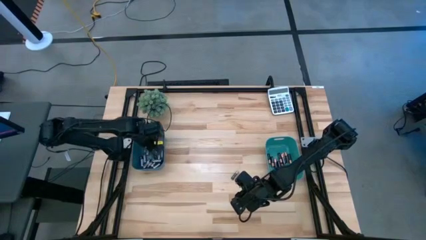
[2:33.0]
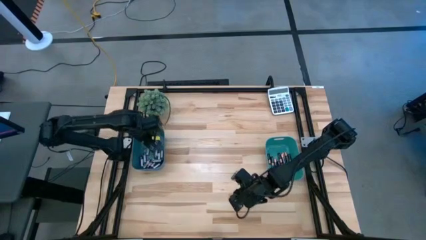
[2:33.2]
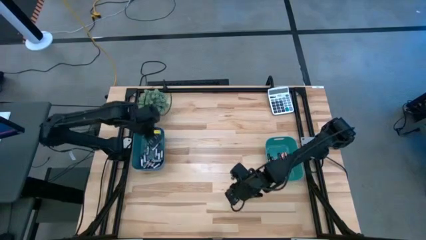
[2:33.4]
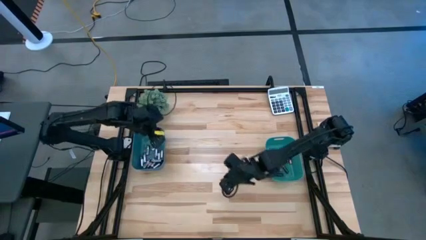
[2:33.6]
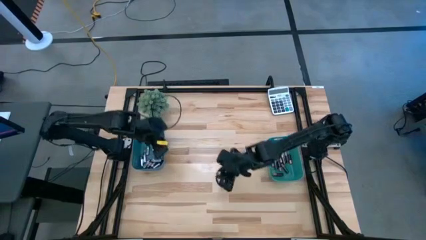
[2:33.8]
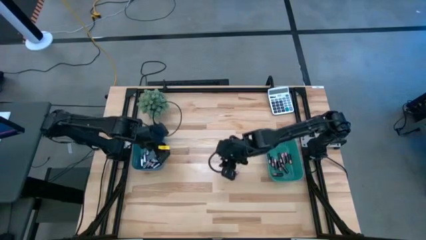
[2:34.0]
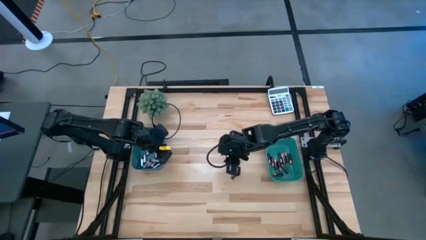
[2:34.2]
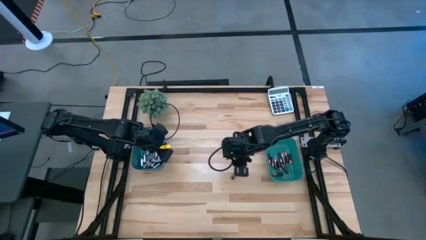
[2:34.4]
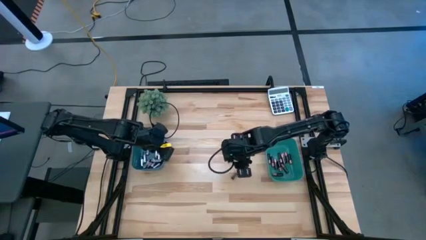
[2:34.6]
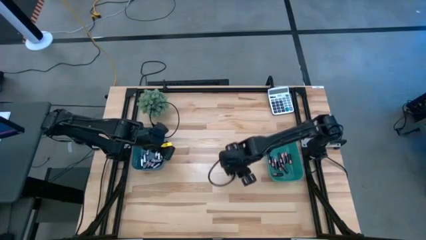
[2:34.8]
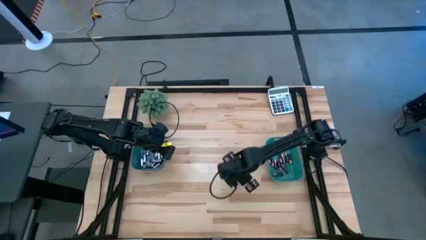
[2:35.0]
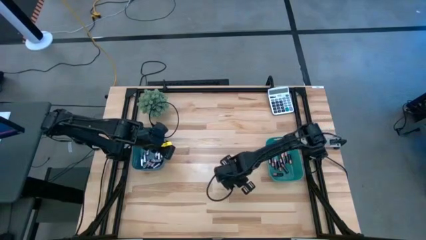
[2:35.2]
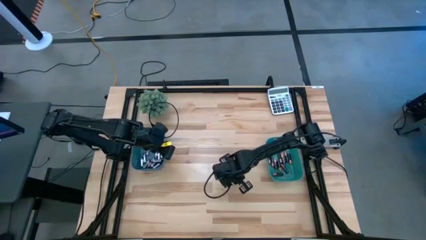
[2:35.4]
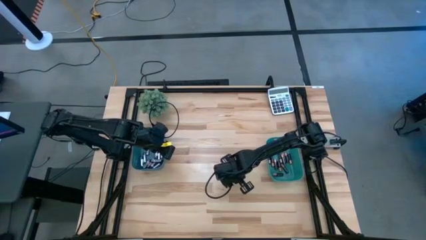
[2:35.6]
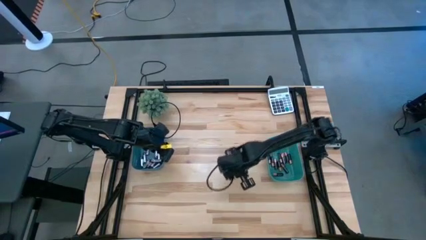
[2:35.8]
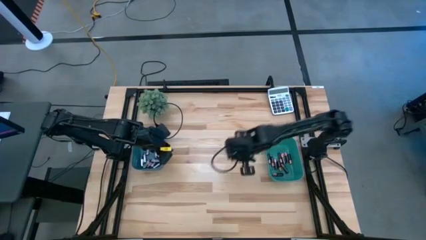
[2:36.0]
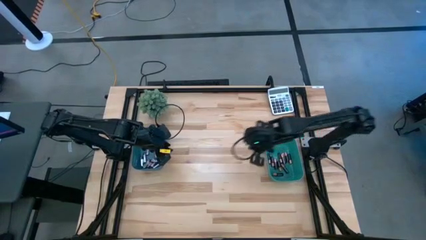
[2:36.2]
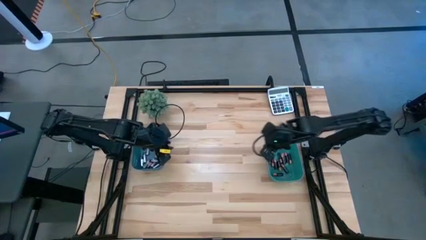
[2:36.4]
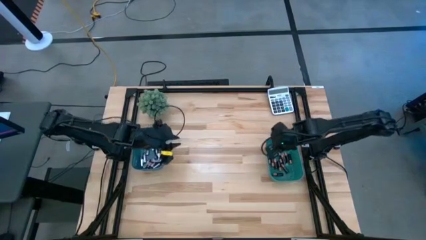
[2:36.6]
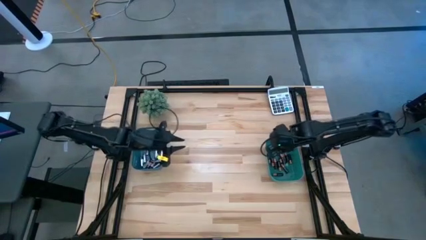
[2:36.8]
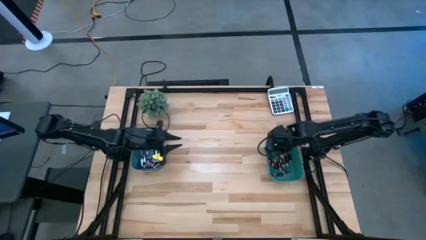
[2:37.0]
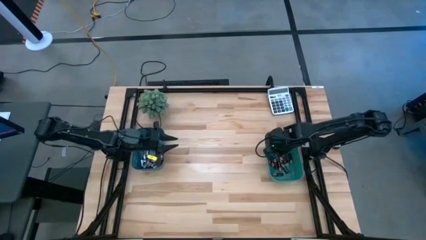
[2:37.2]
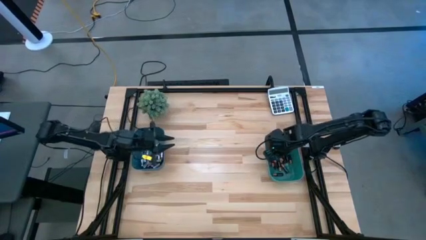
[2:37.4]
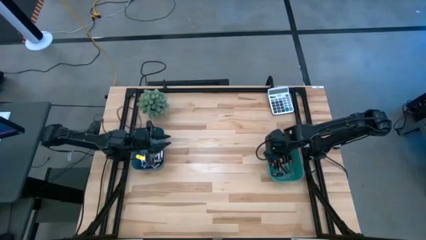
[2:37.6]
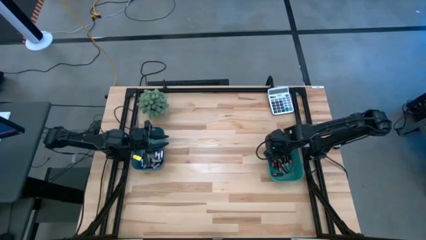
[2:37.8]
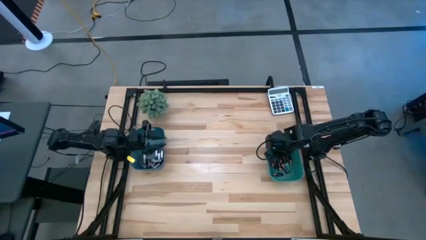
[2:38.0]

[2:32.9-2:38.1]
Task: Sort batteries
Put the black battery into the green bin

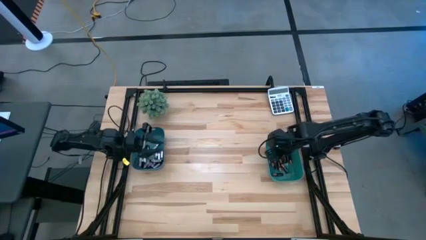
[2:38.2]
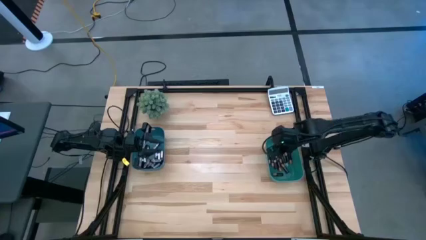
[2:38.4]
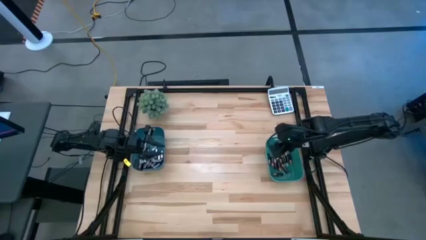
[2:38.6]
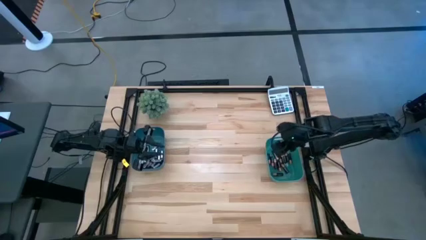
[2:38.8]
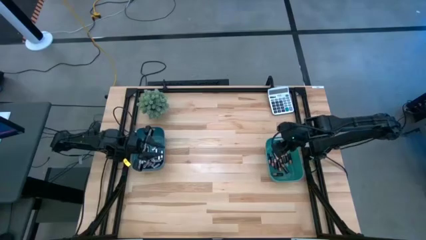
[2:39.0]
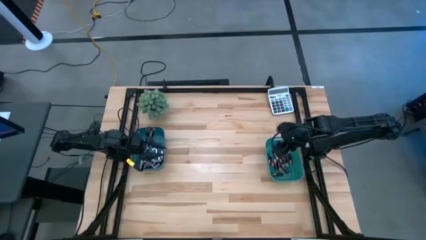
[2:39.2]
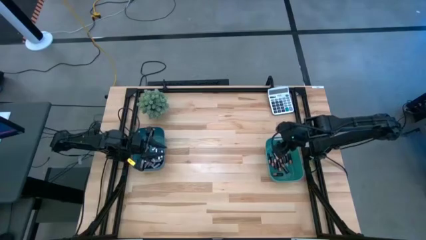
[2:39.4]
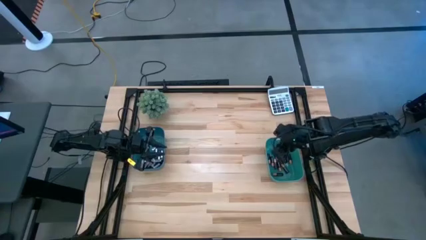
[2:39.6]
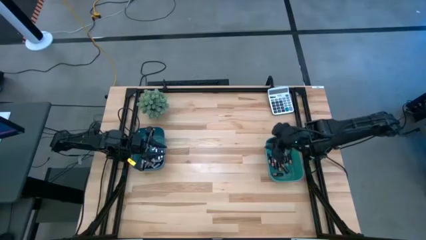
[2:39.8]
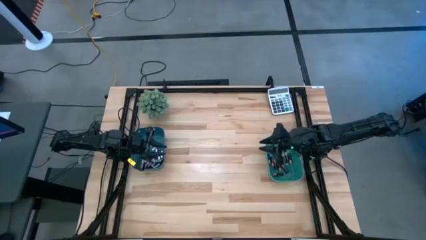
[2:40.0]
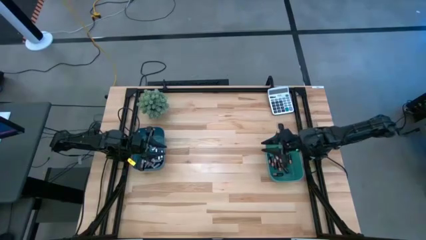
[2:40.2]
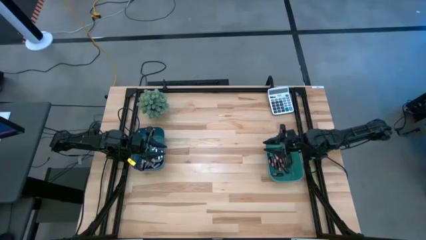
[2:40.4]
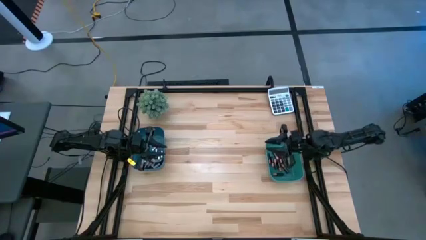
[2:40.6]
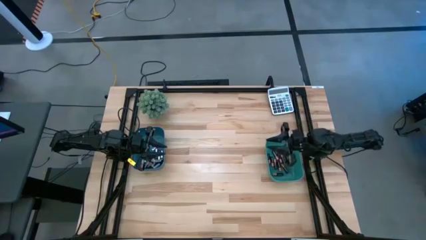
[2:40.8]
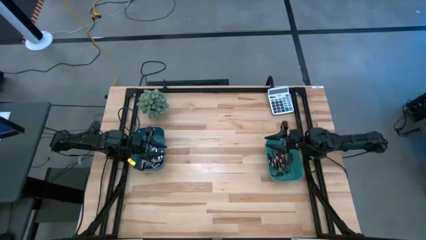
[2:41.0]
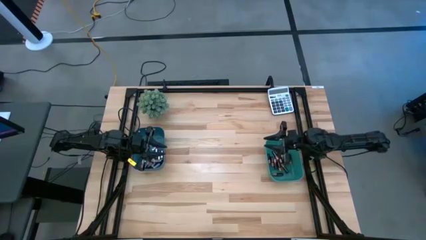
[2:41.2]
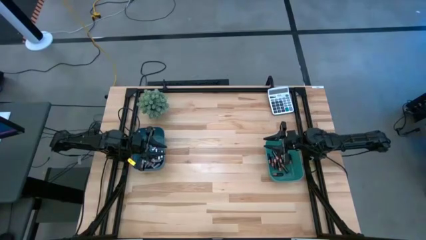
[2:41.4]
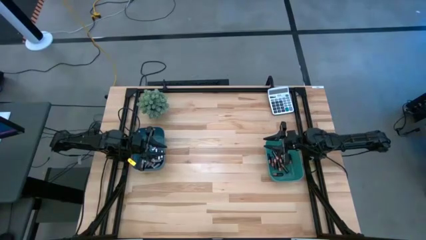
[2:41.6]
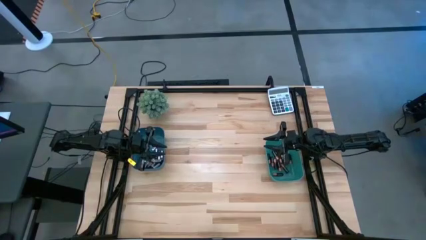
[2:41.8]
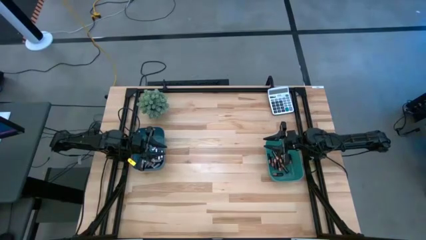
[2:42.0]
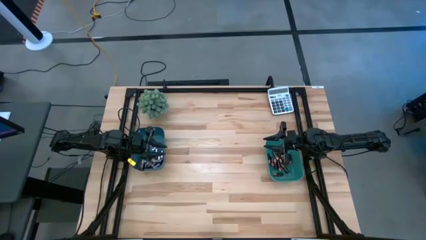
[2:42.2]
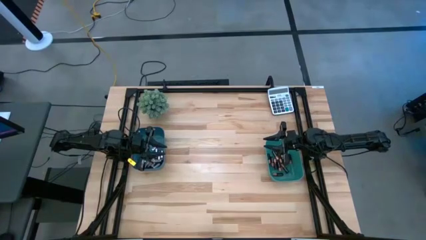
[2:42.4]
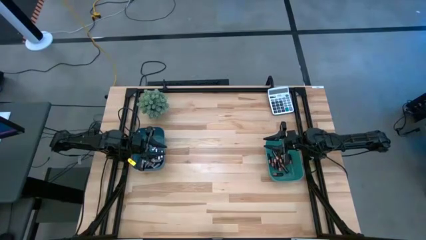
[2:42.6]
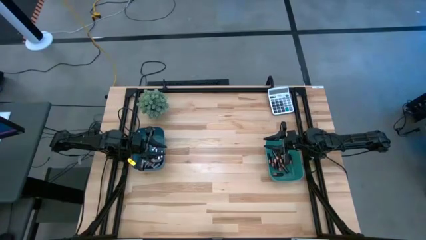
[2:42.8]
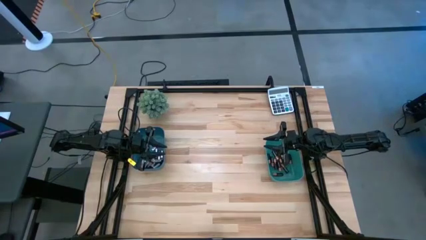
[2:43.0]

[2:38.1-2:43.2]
Return to Home Position
